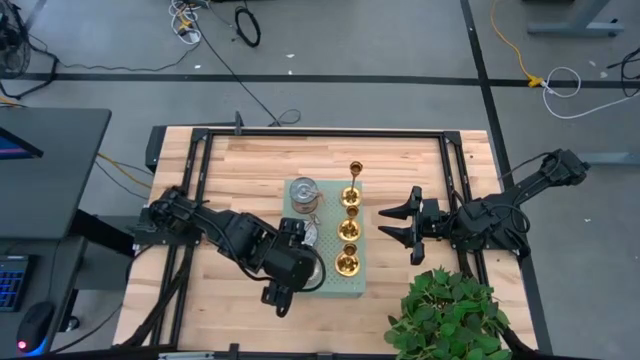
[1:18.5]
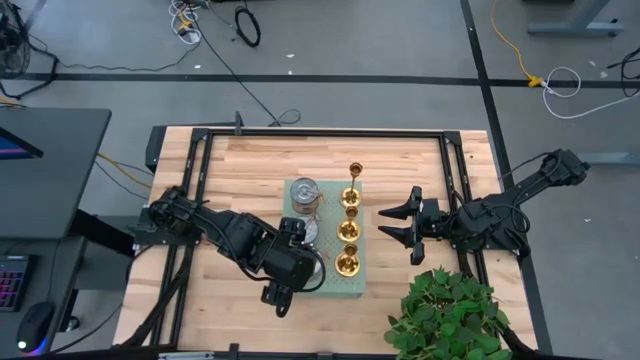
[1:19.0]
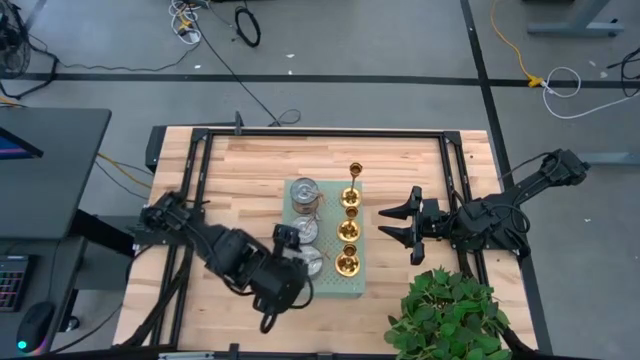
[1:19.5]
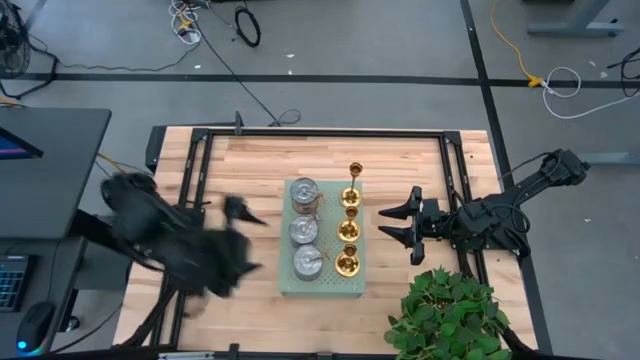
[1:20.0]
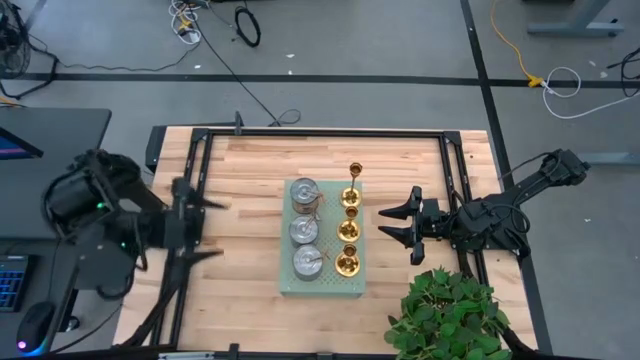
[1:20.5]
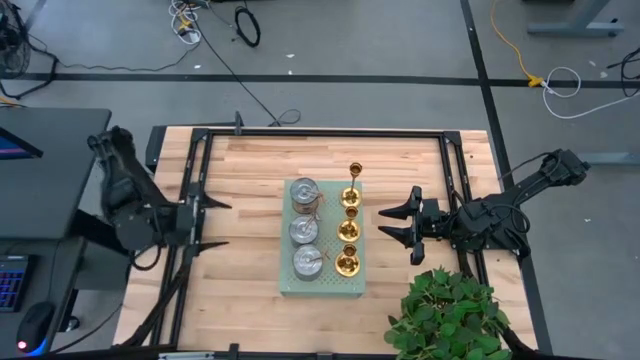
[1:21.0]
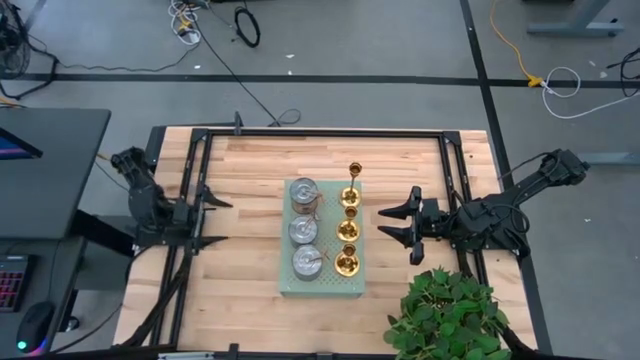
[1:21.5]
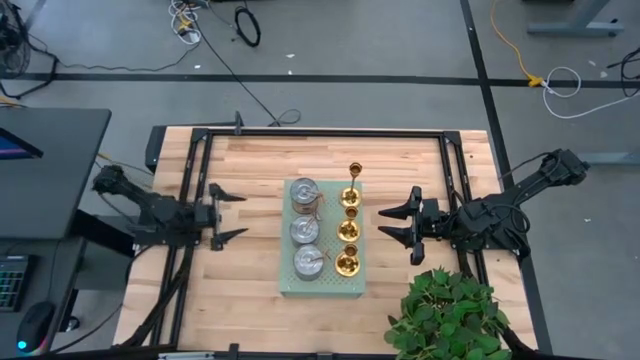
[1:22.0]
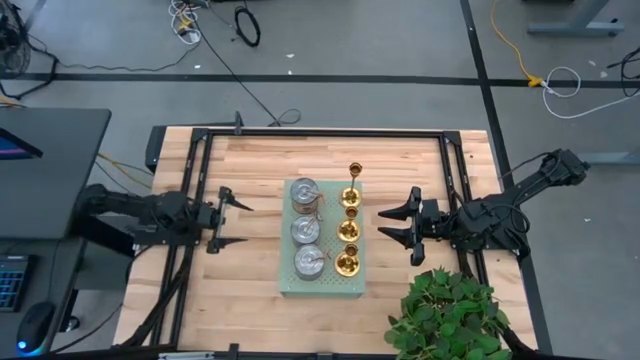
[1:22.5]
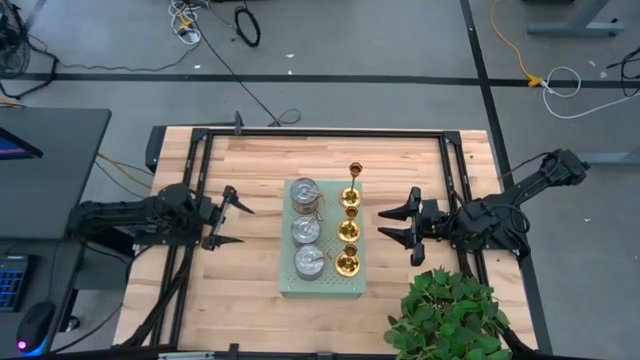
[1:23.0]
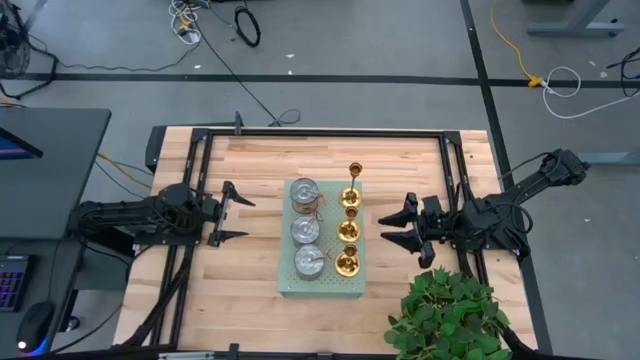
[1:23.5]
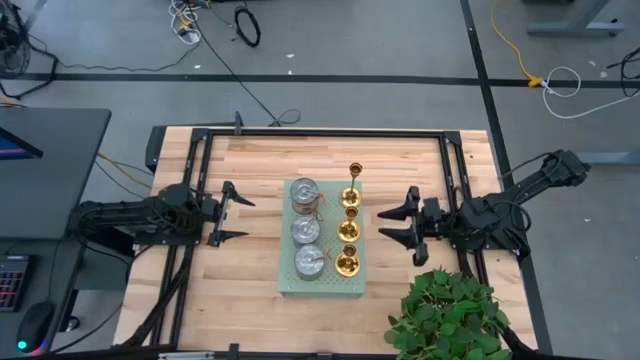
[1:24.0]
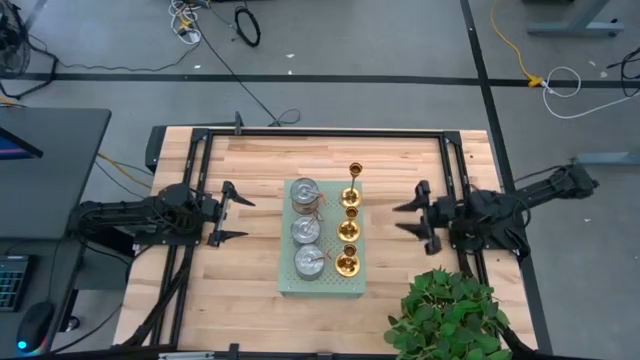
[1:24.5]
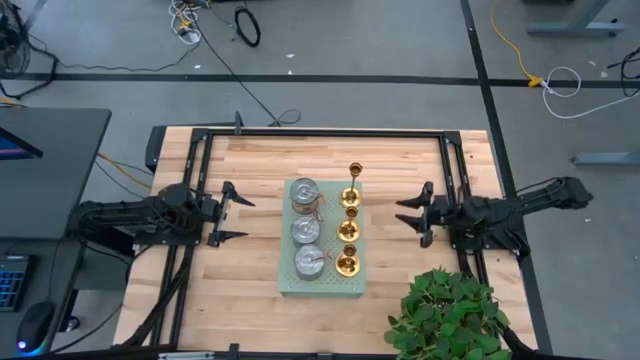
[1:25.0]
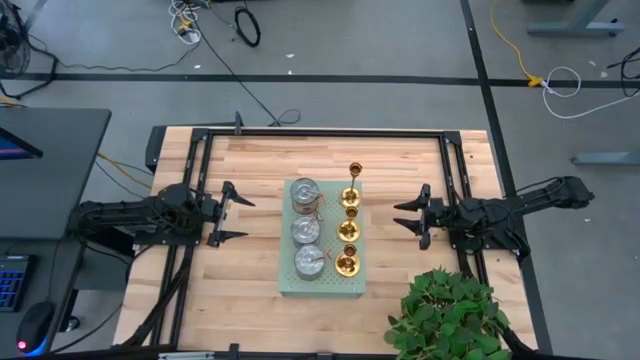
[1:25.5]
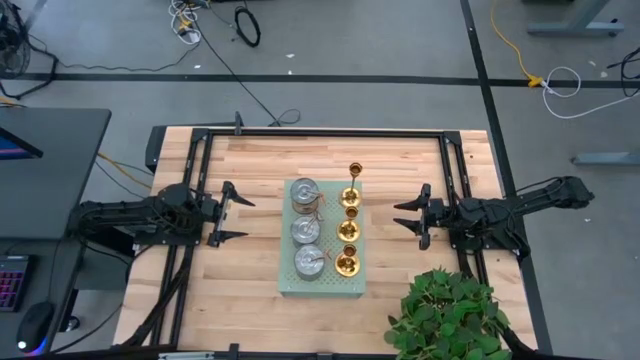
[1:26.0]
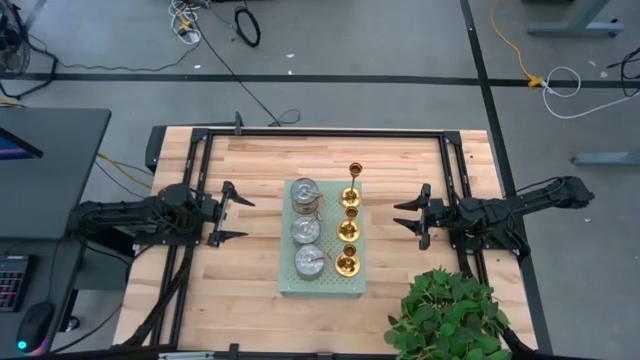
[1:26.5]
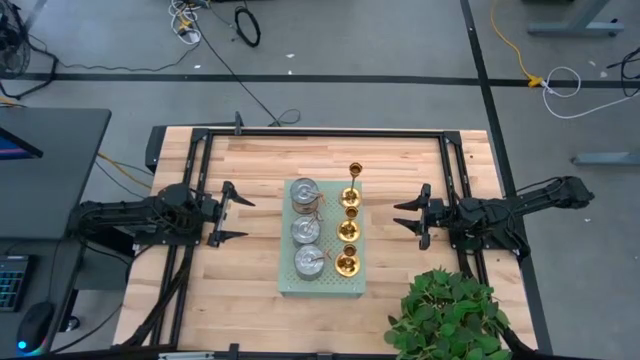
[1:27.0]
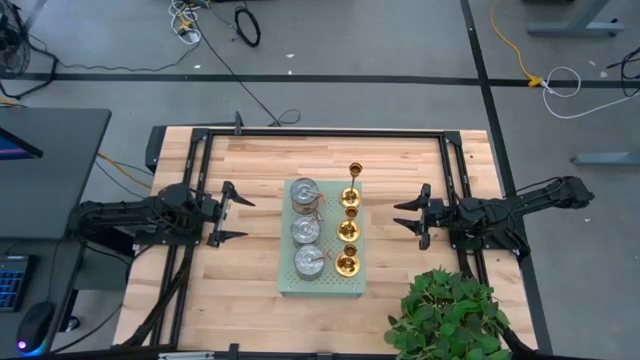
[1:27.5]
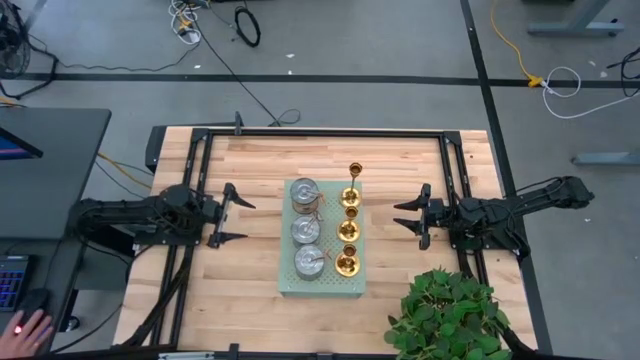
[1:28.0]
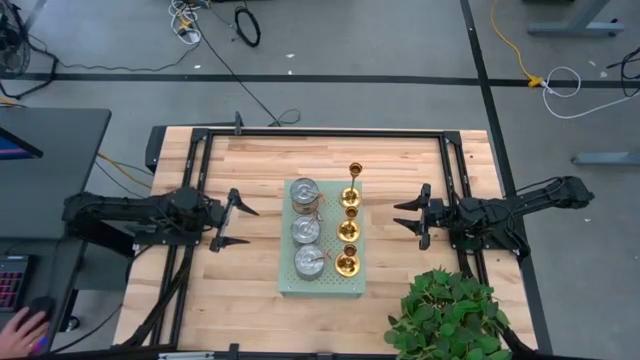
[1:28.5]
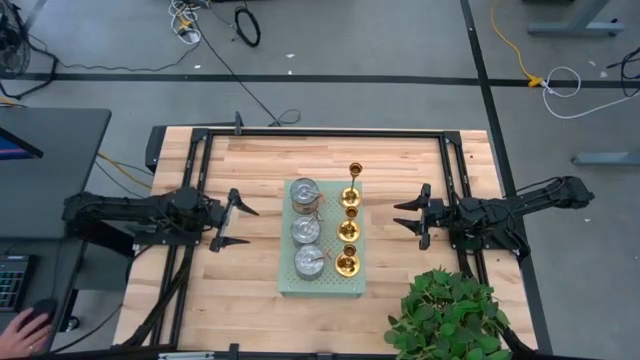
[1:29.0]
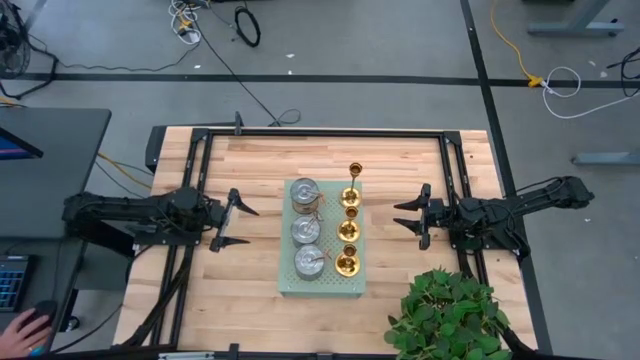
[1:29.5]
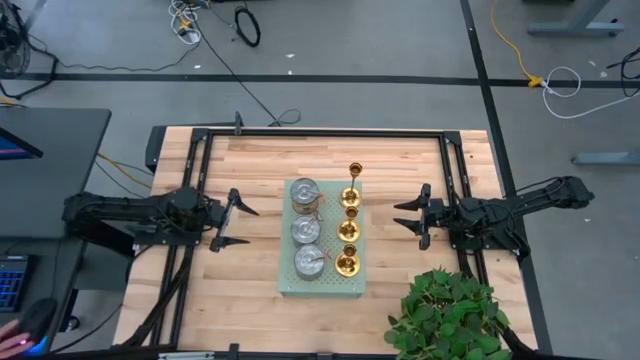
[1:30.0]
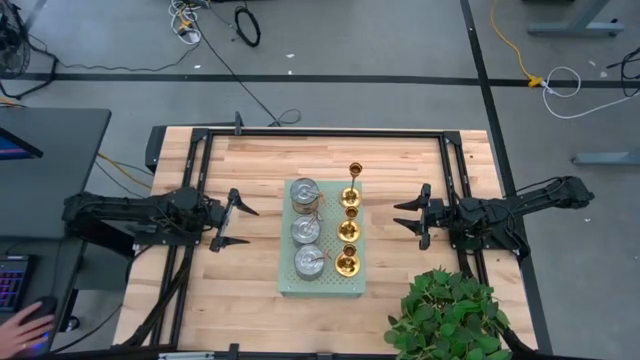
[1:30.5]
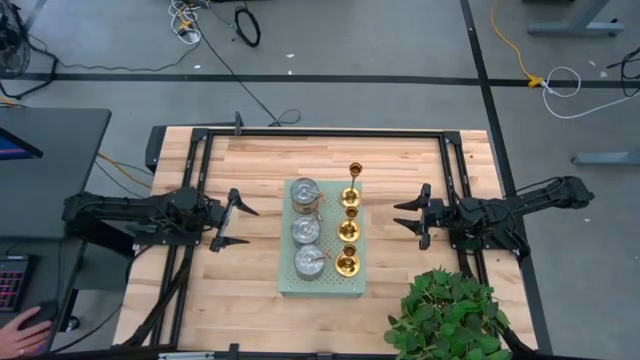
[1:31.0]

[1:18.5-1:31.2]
Task: Pick & Place candle stick holders
Return to Home Position
